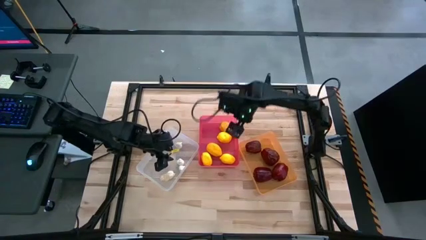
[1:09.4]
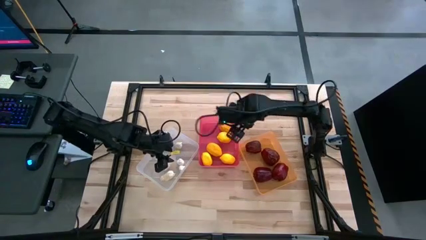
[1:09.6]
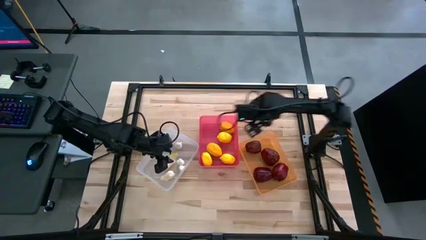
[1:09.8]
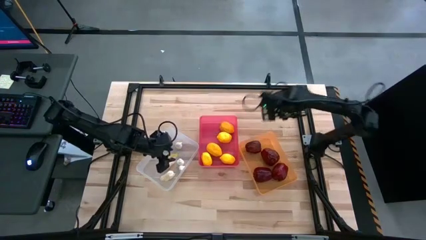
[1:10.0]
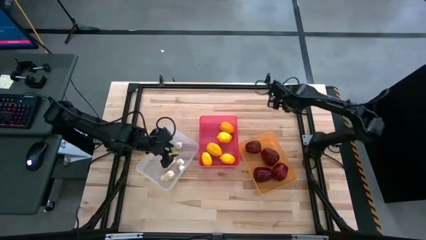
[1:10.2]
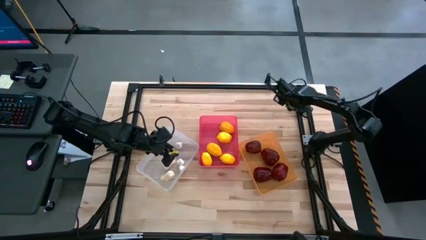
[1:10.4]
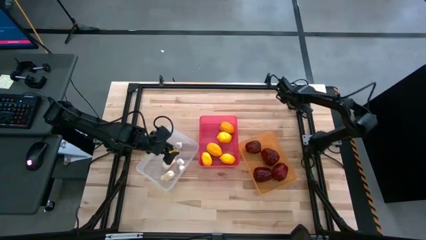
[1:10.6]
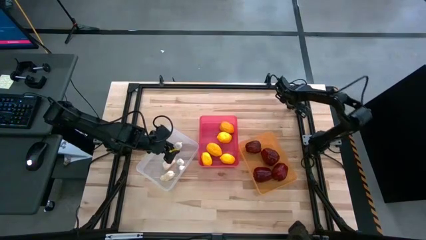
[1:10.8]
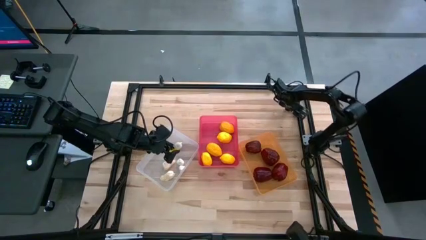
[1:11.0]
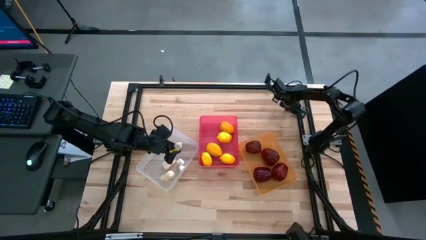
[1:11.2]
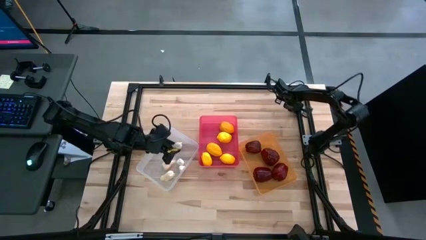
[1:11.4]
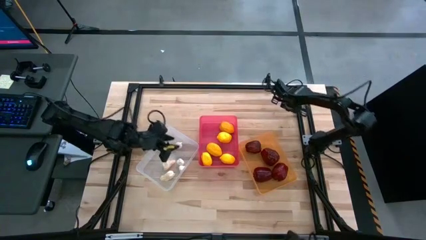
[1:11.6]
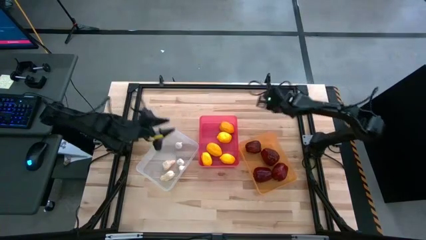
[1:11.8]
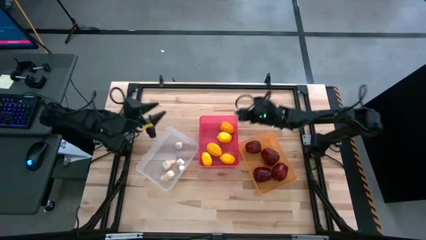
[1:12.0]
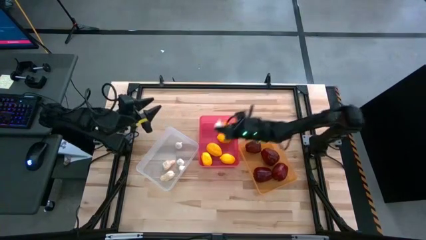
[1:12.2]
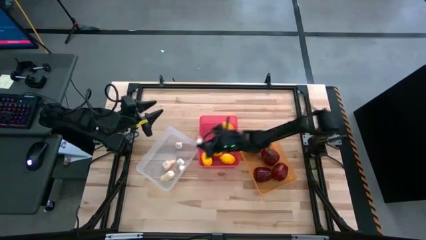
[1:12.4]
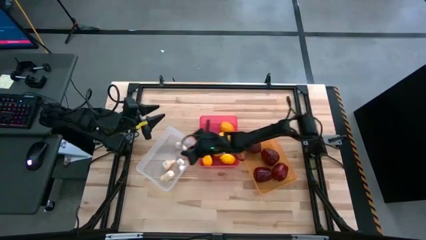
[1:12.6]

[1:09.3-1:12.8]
Task: Sort produce into baskets
Put the white garlic into the transparent bin

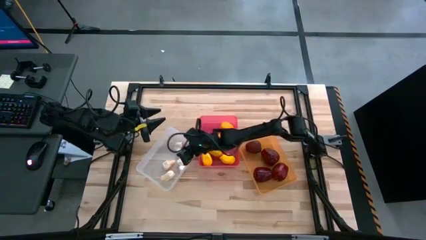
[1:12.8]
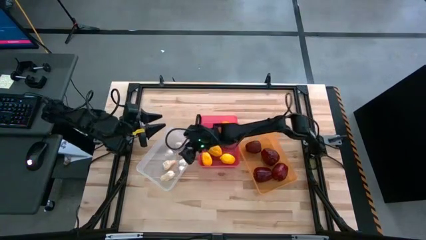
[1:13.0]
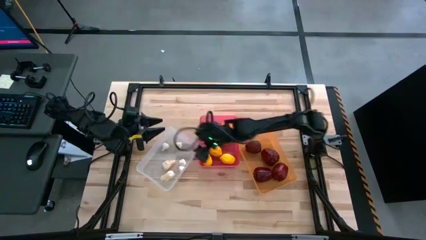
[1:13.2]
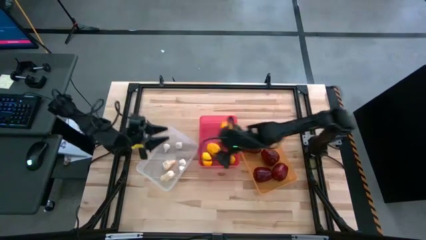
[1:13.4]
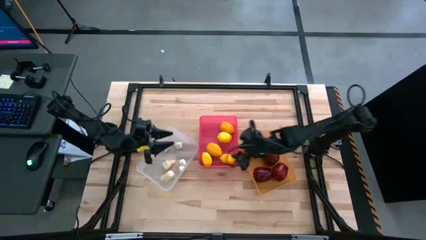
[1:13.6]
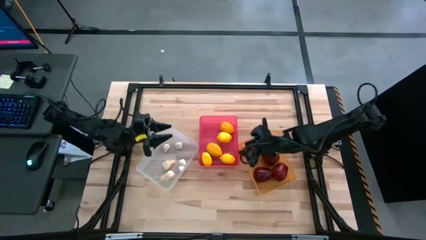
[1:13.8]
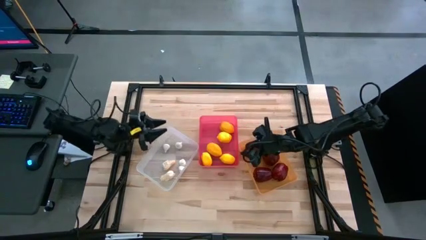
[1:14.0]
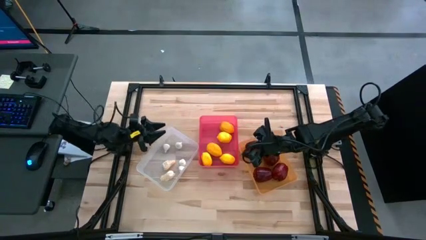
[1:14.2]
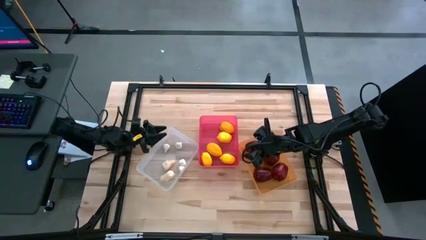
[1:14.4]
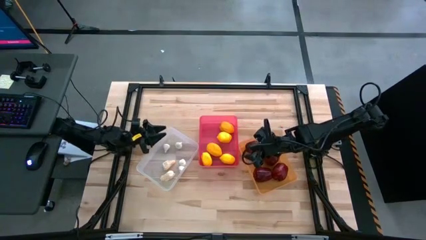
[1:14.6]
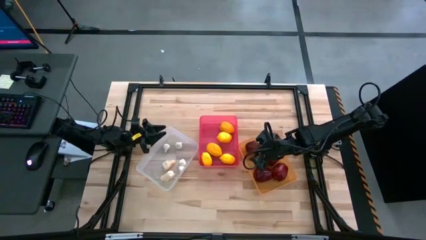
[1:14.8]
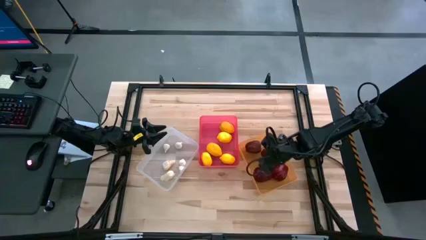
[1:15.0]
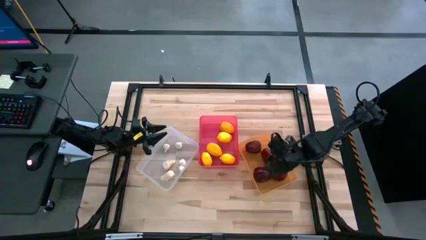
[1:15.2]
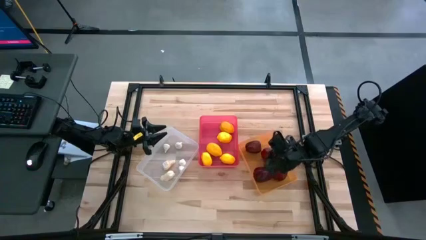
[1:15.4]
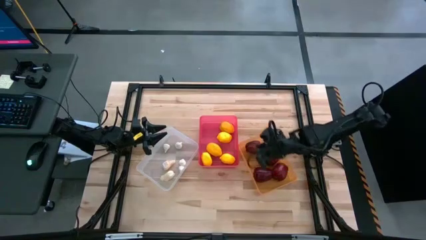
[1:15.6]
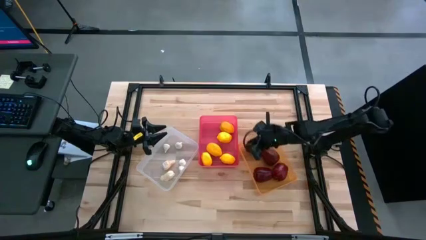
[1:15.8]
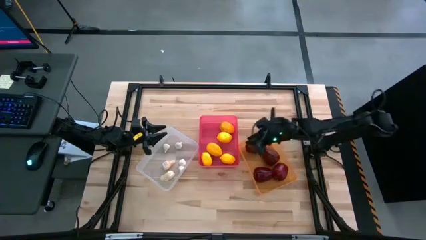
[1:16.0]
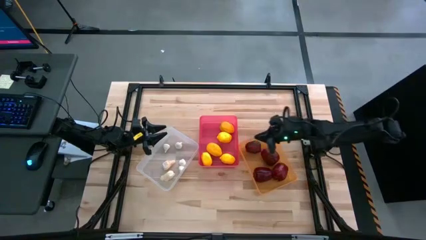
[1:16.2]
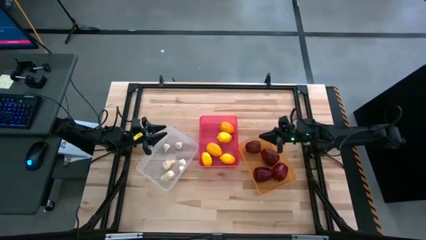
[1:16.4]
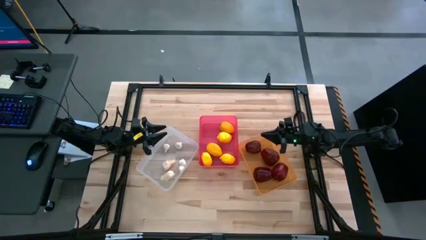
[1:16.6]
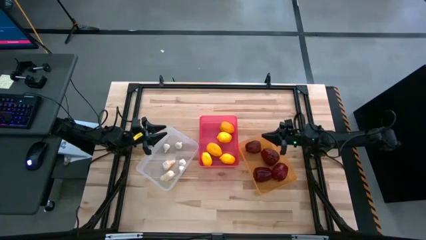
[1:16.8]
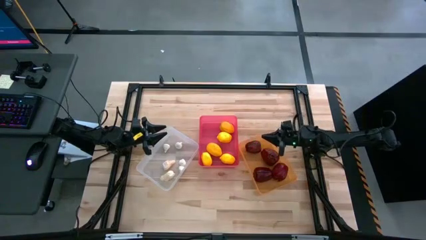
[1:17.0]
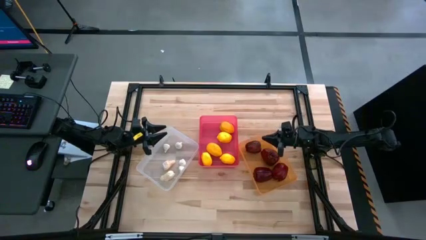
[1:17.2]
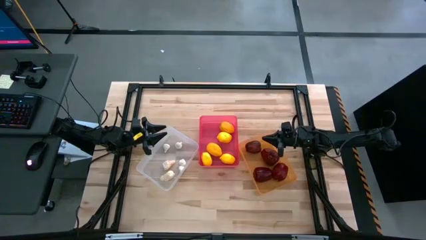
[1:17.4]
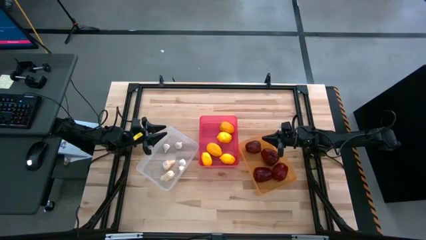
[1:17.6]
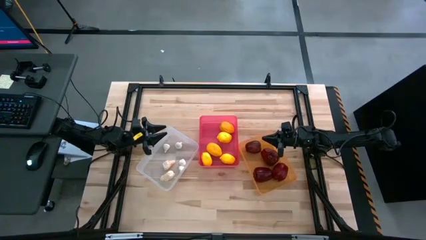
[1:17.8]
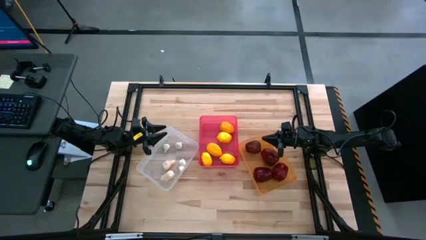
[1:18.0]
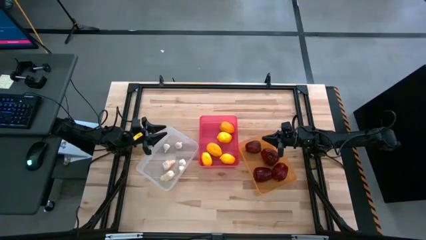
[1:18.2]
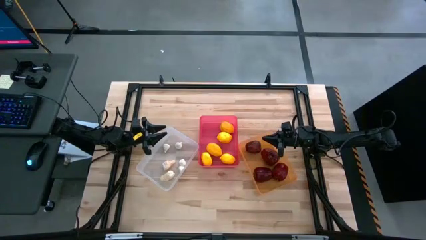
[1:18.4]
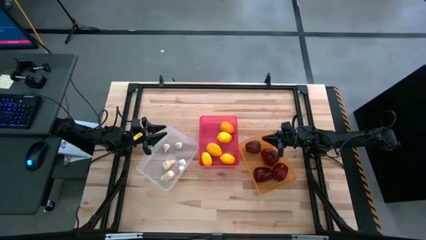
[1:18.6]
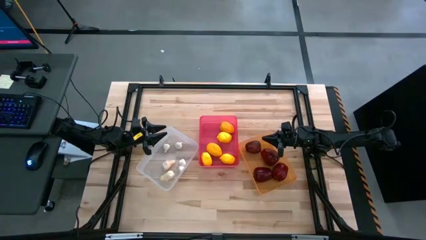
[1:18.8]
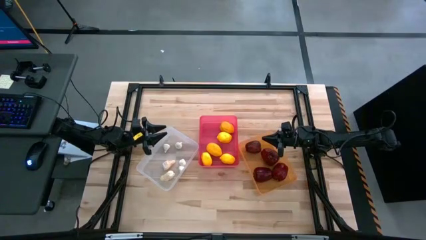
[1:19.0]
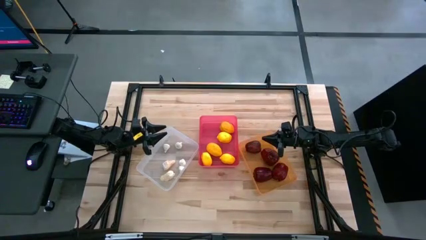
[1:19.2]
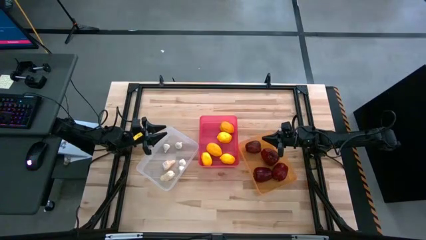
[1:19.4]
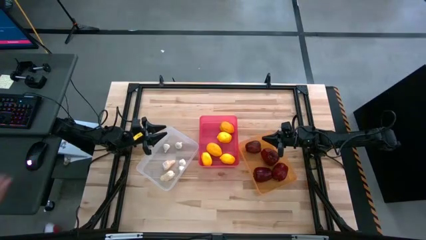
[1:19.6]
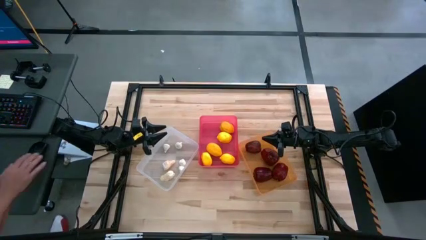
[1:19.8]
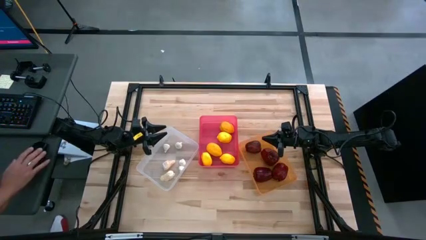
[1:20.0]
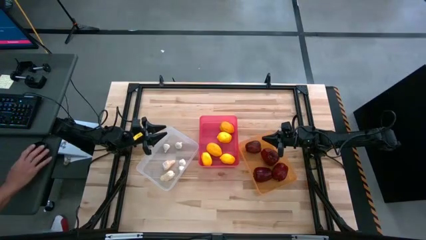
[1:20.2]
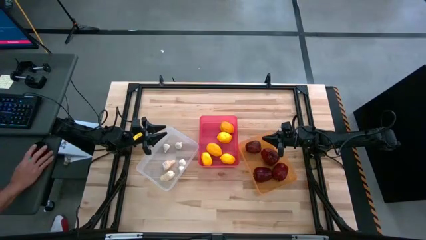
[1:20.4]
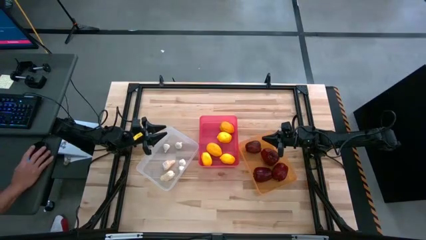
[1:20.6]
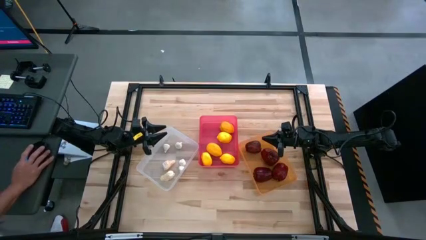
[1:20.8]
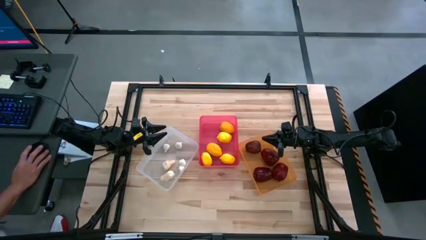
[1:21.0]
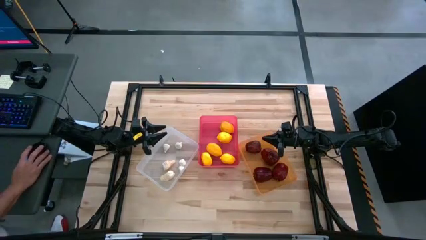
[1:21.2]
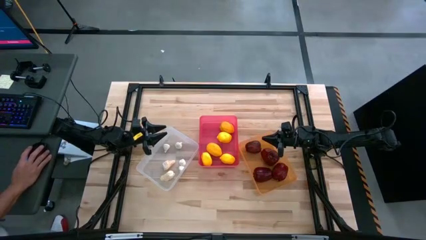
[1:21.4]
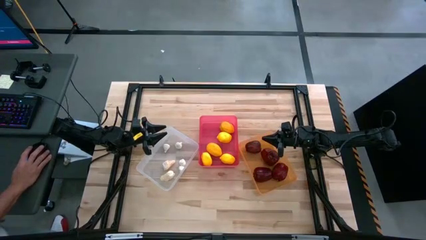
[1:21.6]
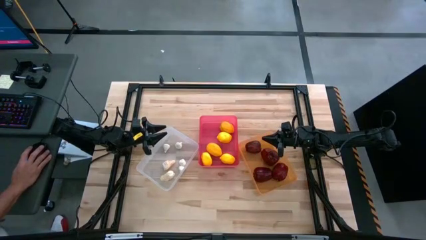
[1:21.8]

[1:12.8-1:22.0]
Return to Home Position

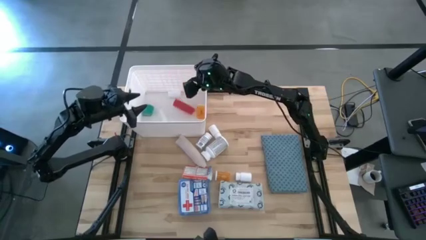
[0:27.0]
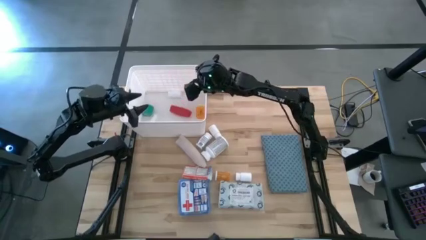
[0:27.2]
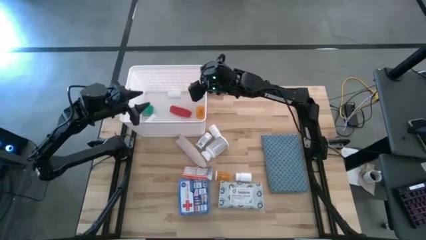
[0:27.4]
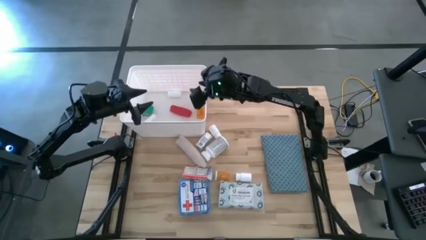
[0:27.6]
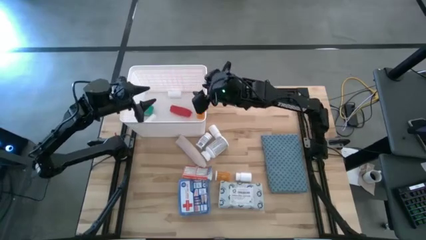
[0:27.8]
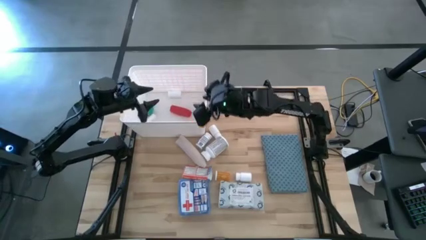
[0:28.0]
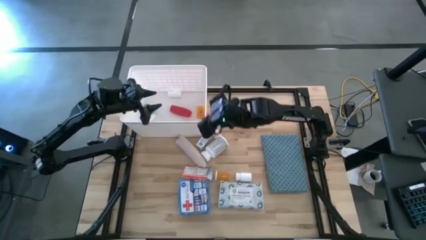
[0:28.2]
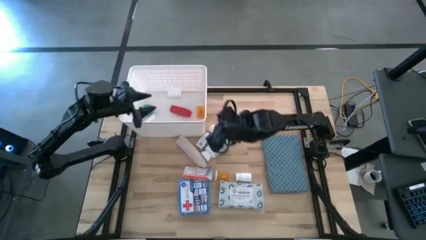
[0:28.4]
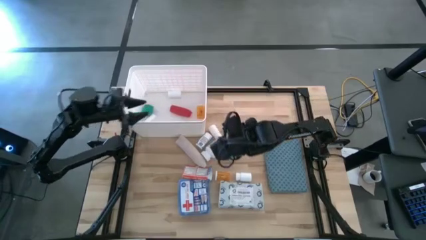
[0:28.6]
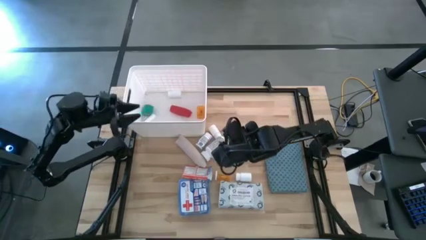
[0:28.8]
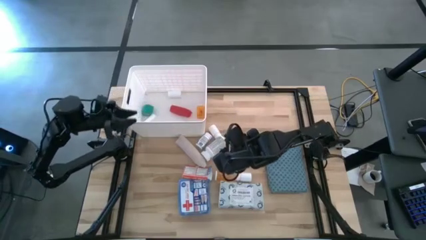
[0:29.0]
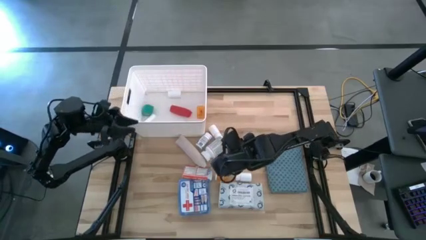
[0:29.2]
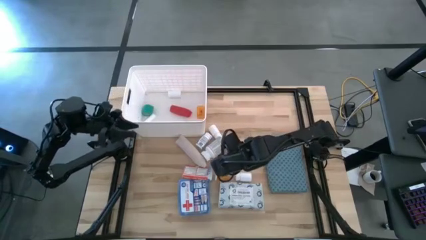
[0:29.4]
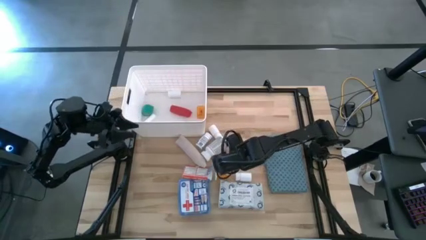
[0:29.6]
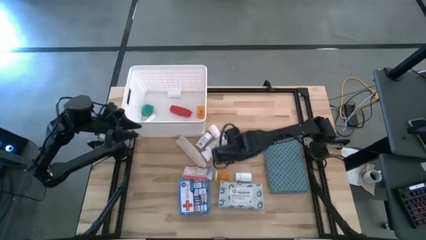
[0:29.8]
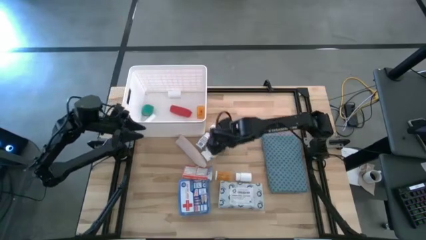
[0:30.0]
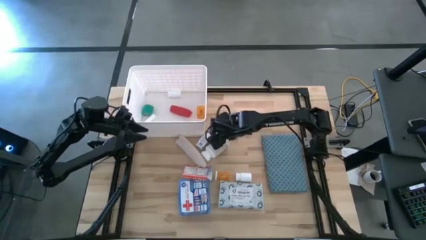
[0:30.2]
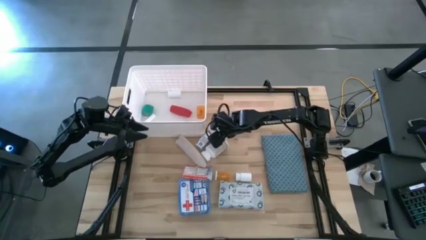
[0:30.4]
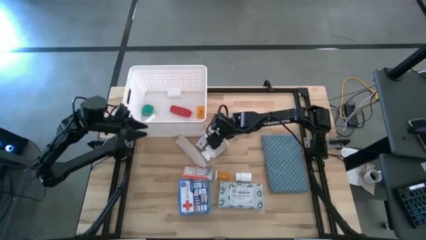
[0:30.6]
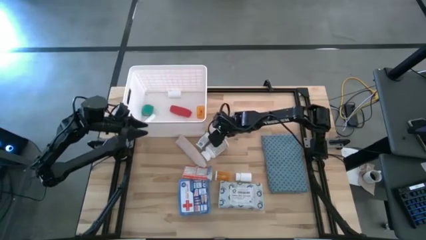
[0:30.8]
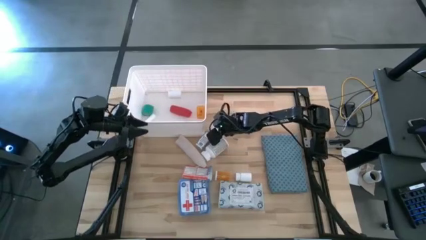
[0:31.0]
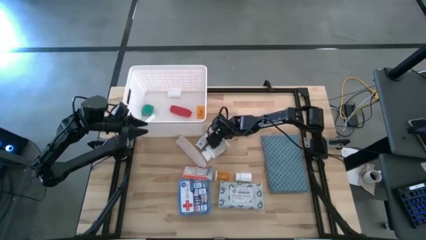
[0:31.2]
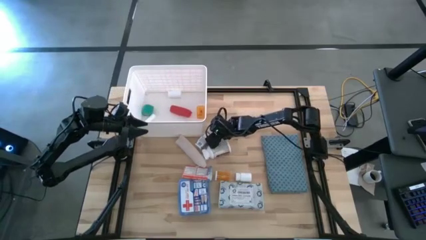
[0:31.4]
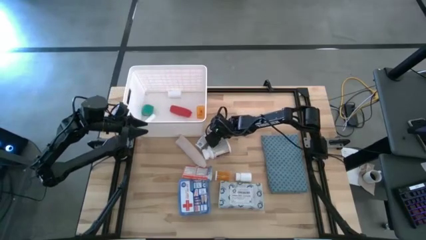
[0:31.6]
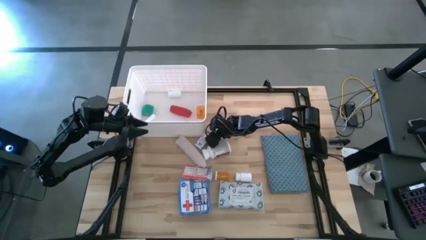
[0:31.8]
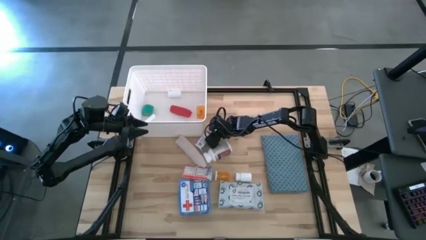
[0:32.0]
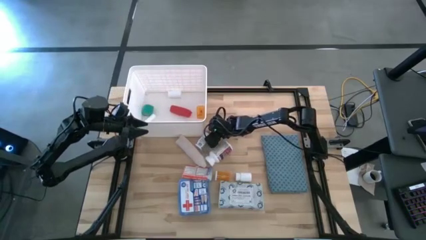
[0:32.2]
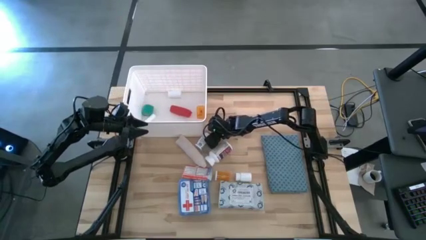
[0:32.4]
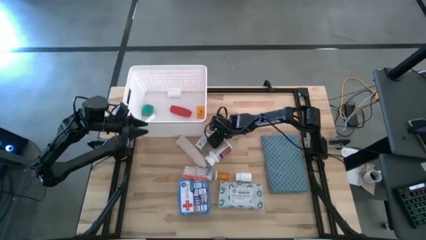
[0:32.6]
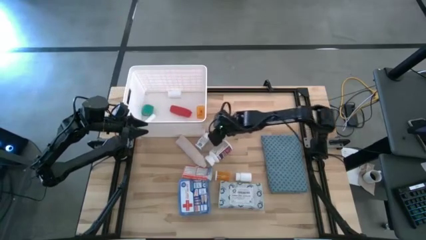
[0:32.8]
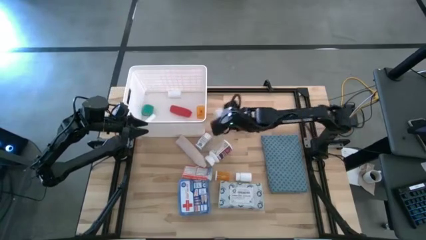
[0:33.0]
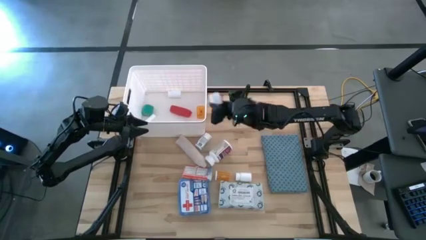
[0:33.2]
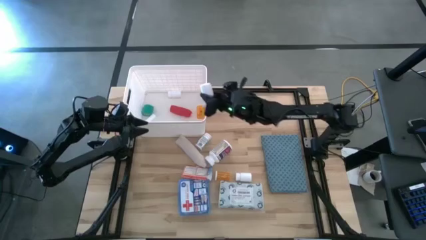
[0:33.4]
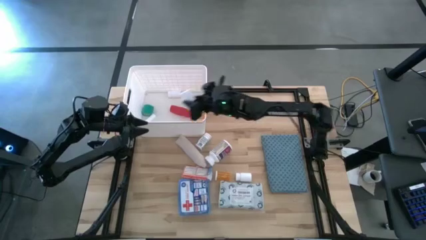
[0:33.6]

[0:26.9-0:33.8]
Task: Pick & place medical supplies in basket/bin
Put the top white pill bottle into the white bin
